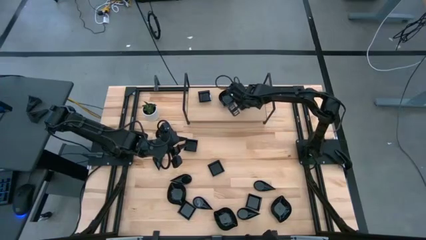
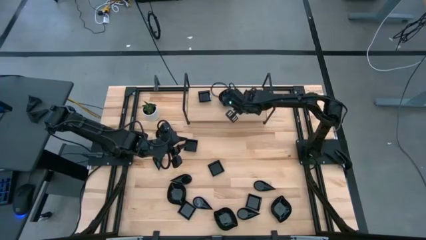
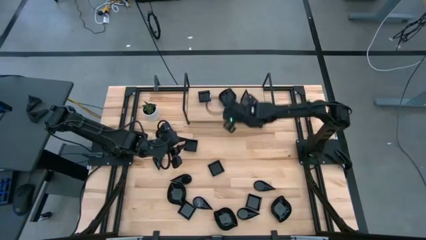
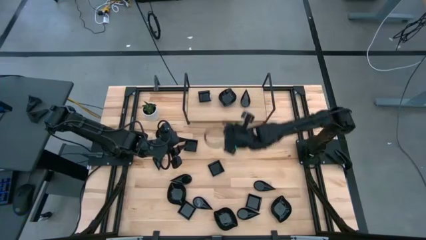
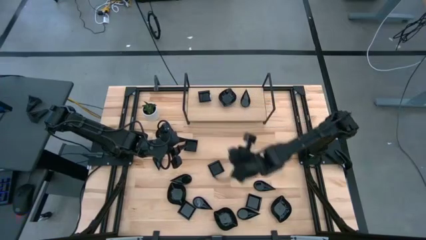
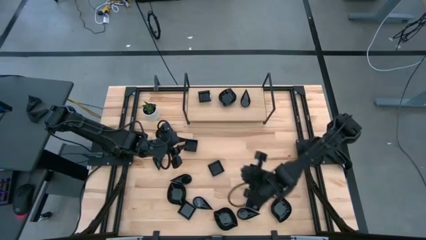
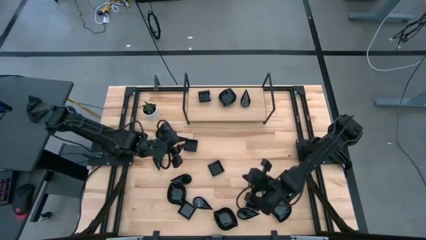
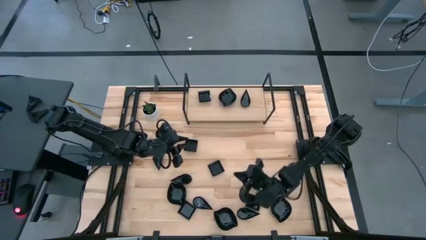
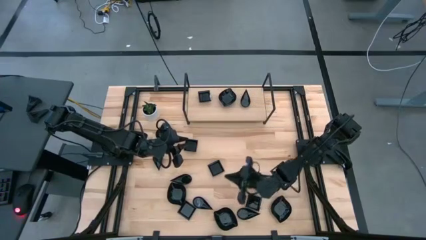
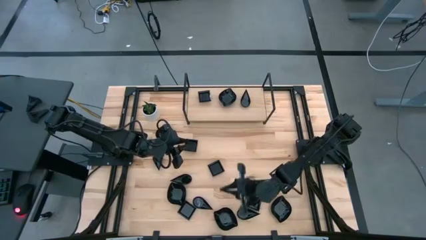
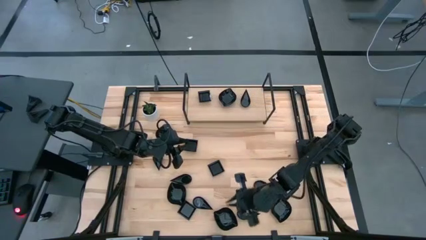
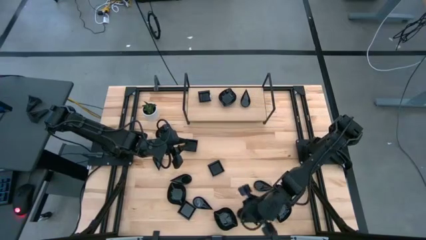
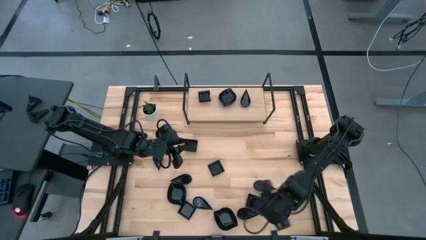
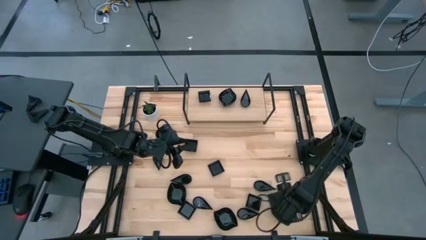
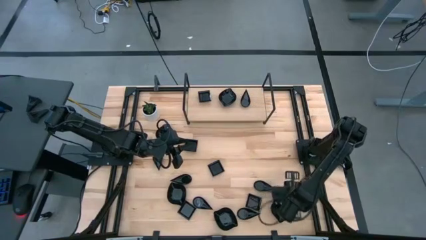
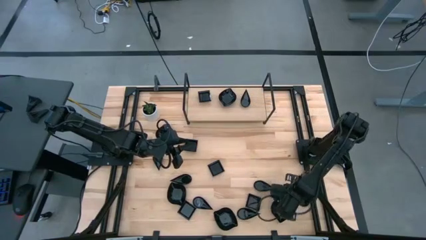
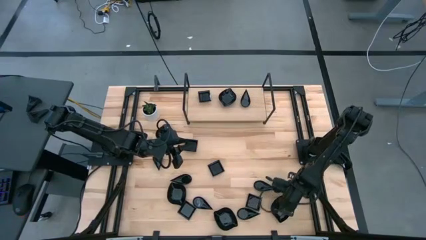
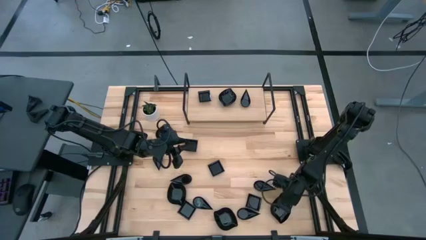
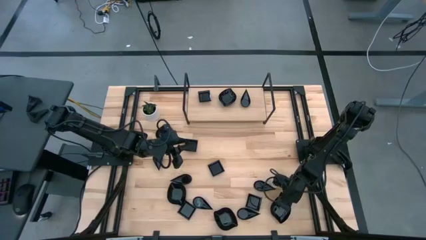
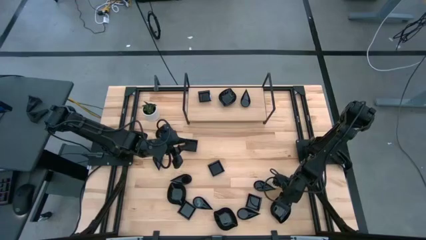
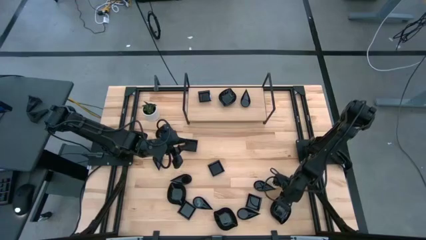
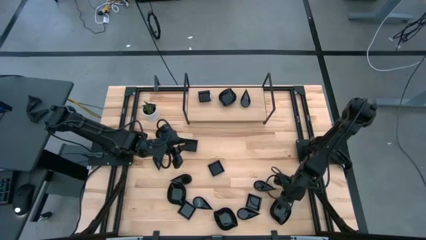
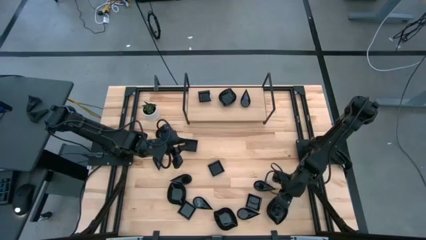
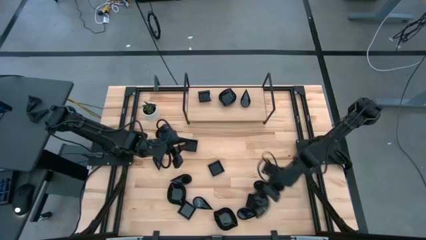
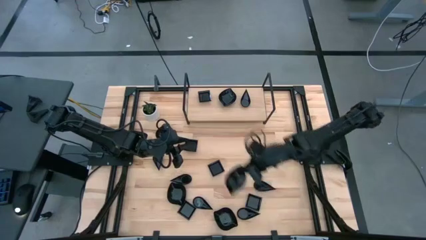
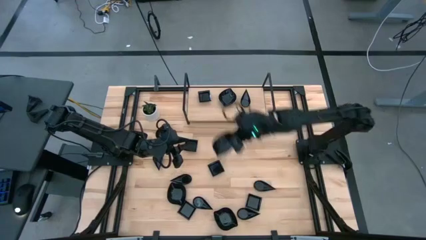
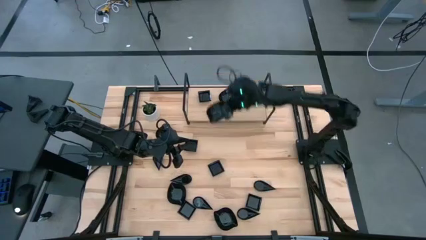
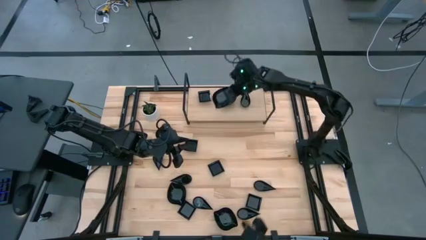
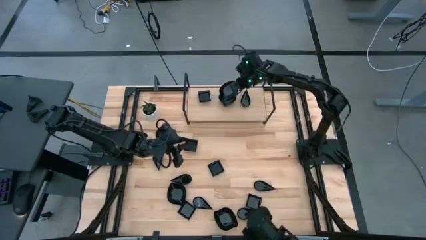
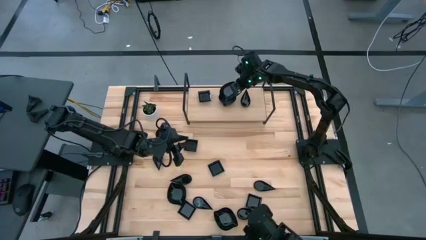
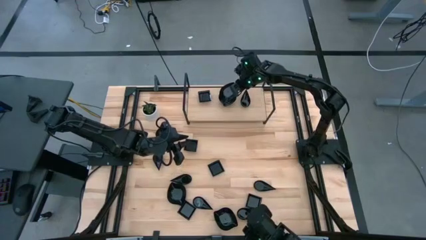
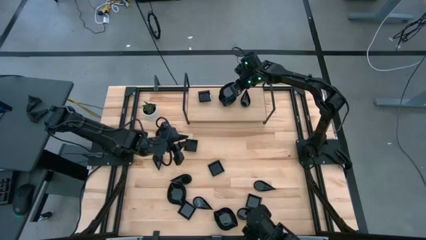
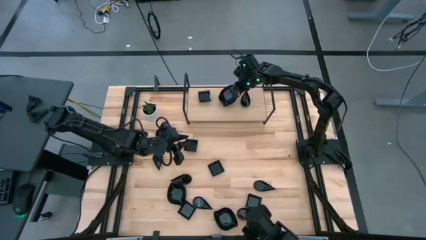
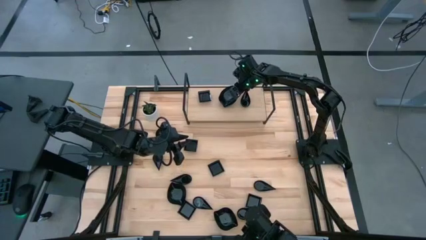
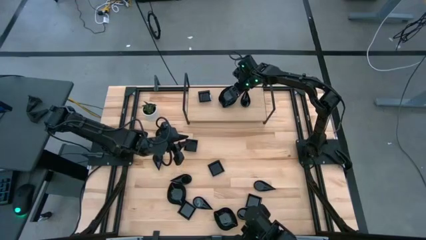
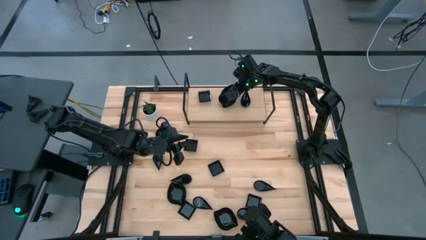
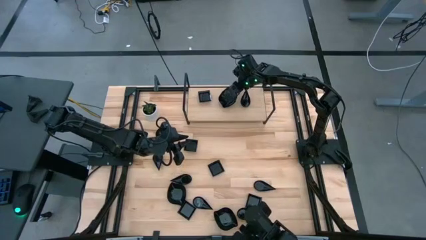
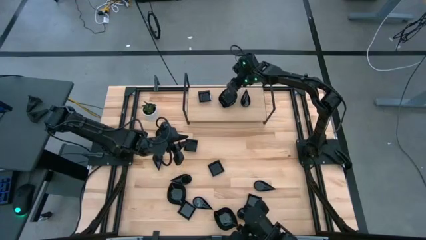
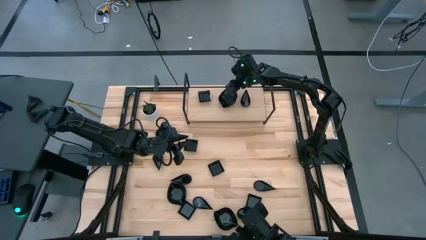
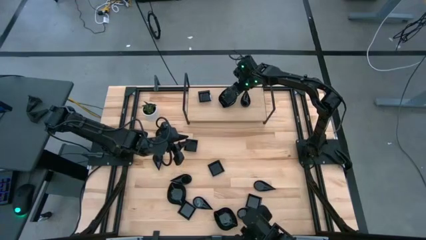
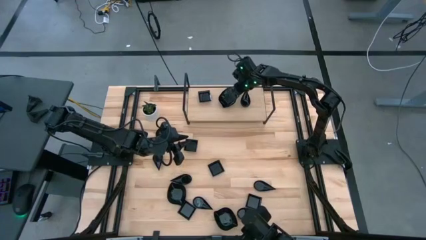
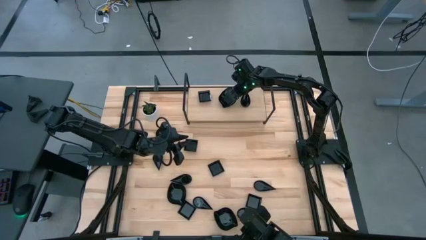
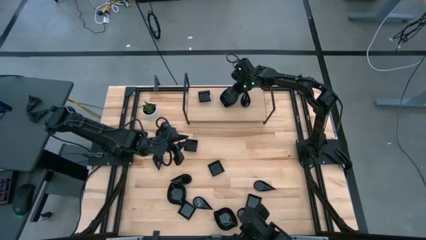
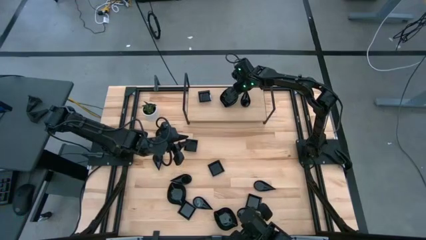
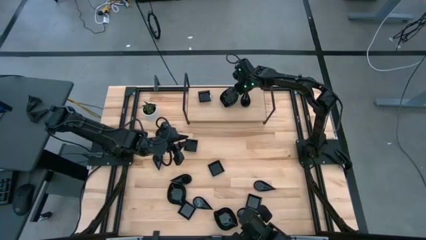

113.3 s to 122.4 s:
Task: Pick & Place Mini shaped plates
Stack the black leaf shaped bowl on top of the other black leaf shaped bowl on the shelf

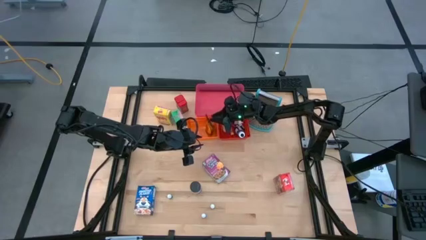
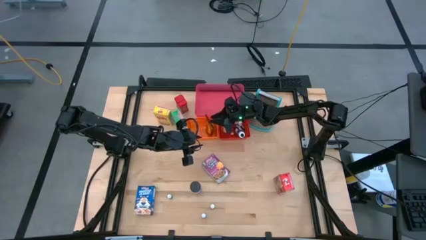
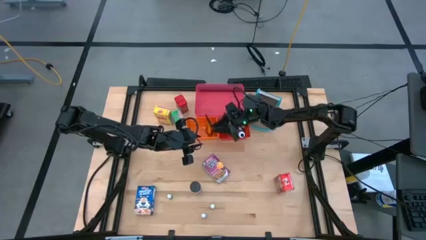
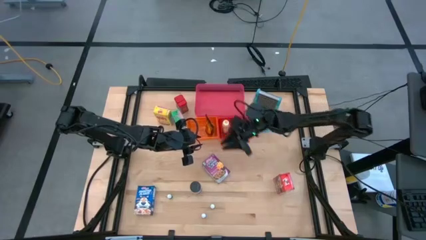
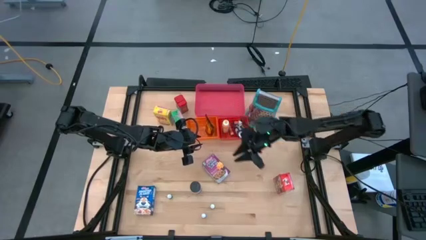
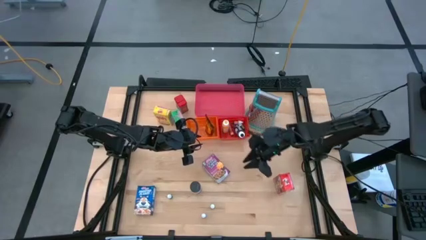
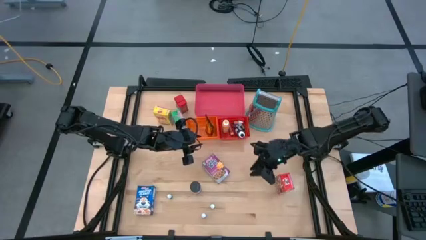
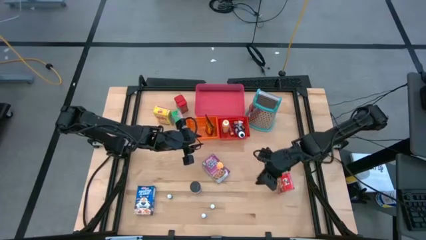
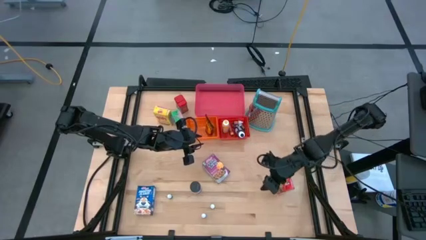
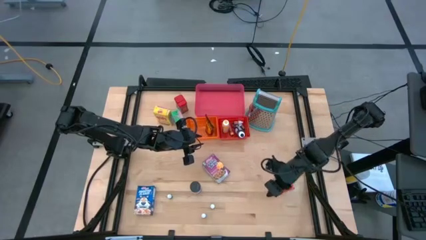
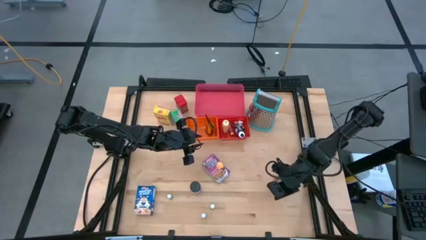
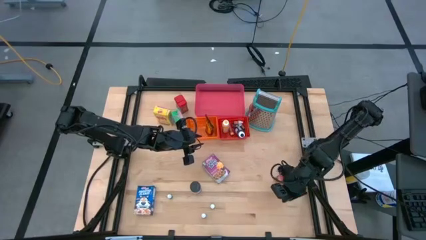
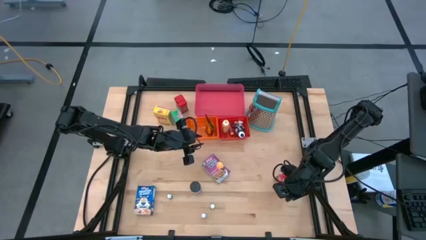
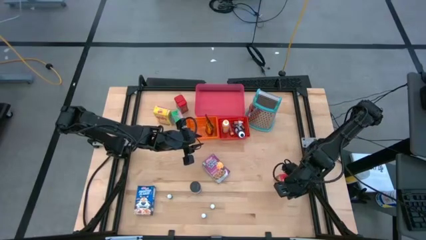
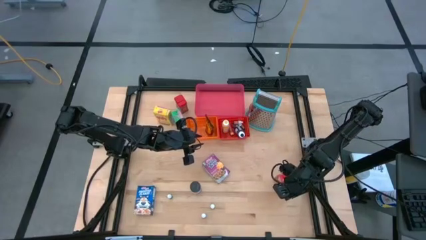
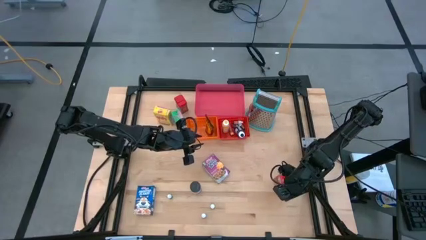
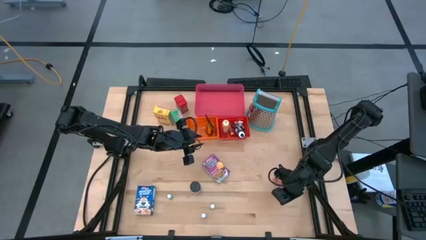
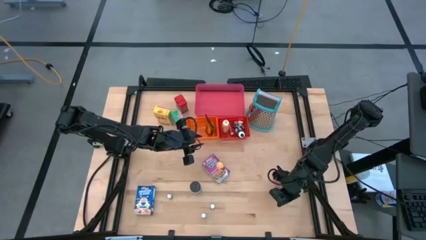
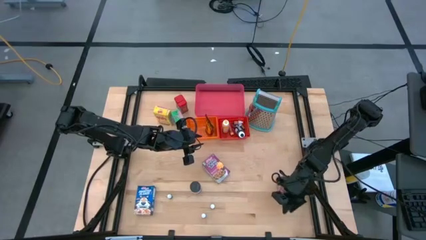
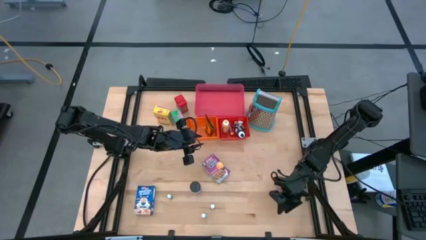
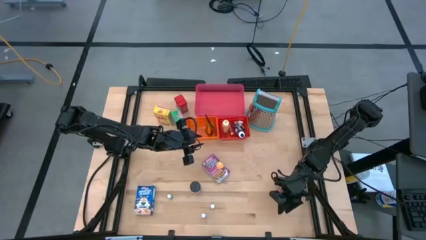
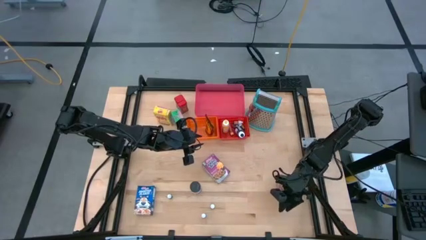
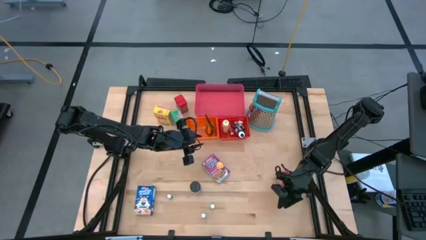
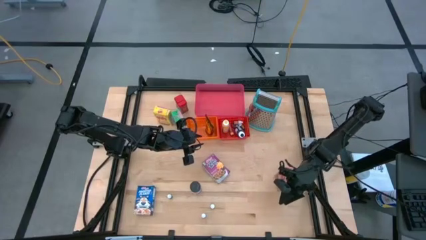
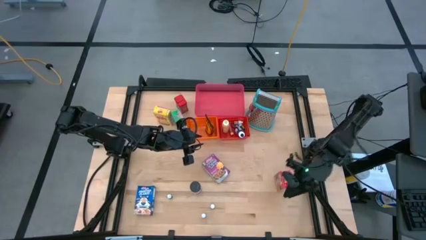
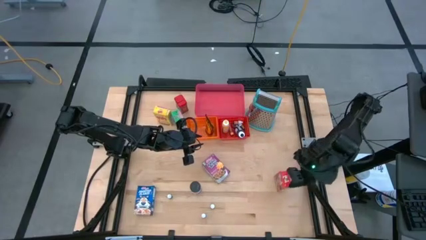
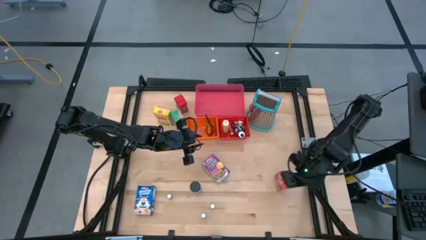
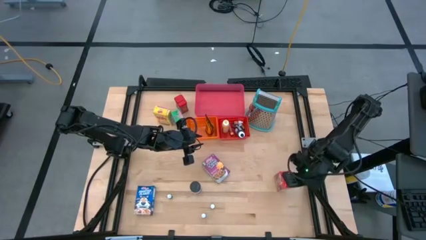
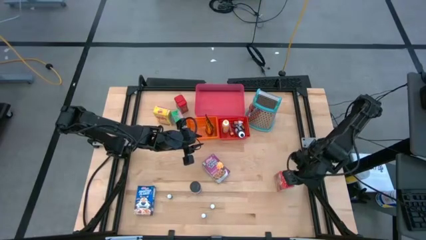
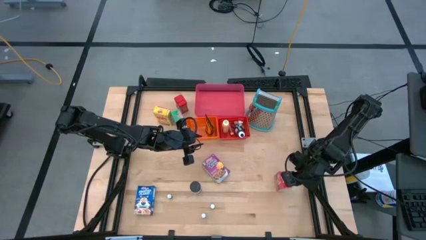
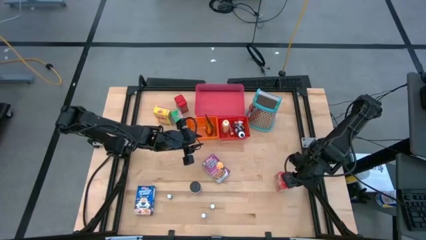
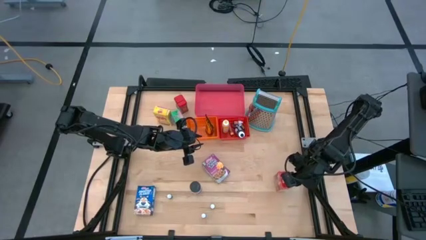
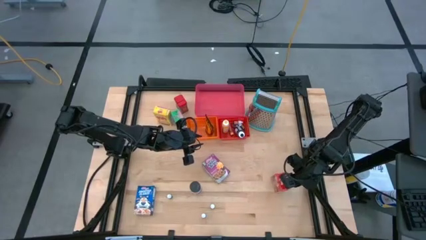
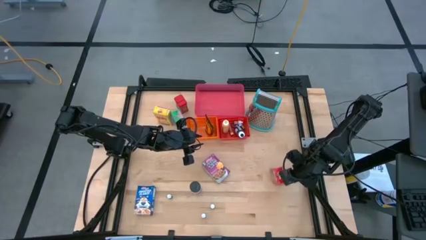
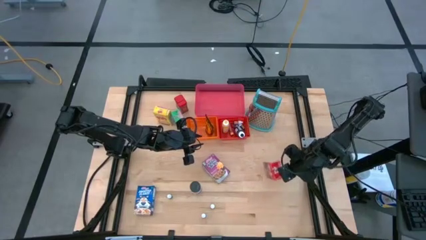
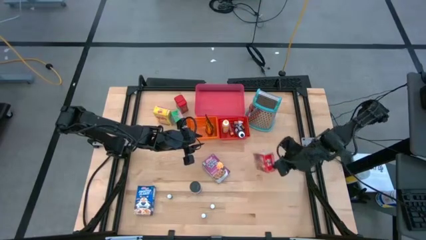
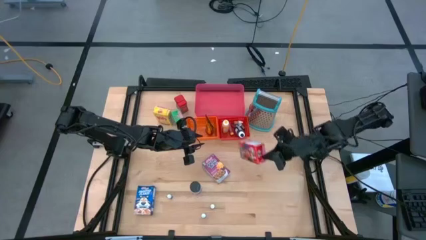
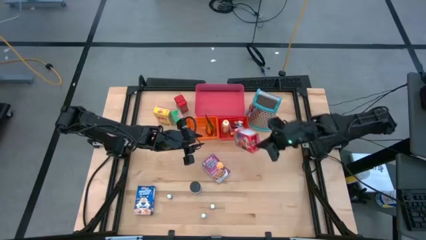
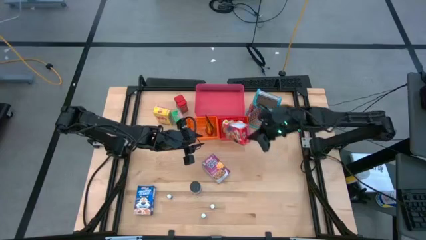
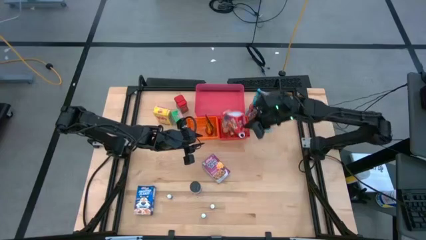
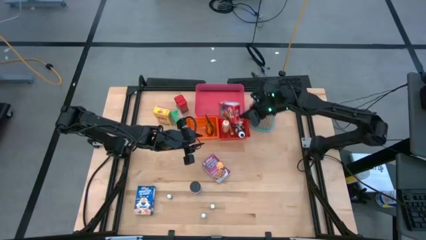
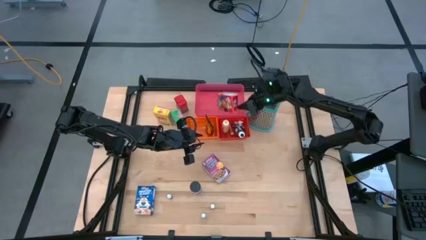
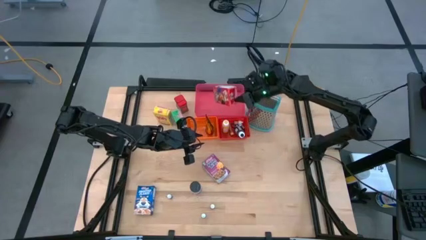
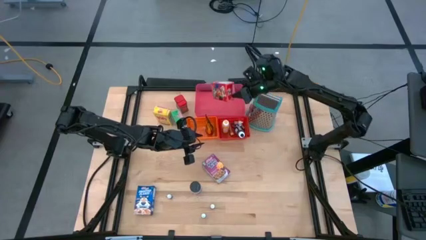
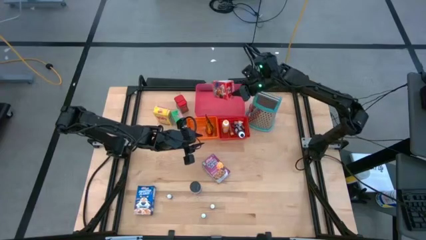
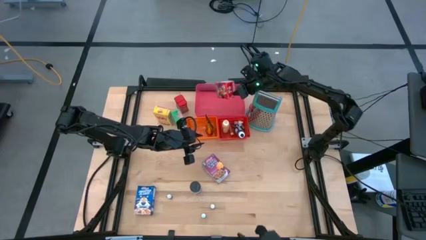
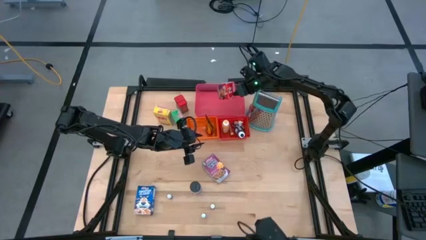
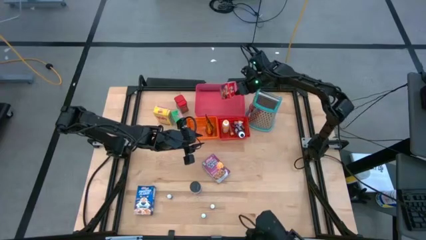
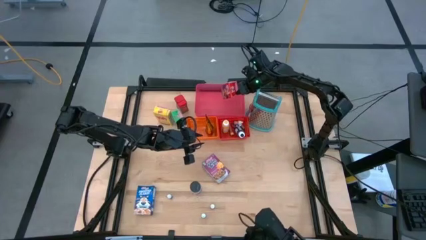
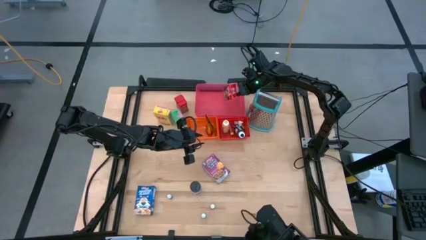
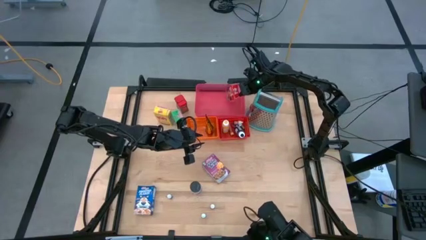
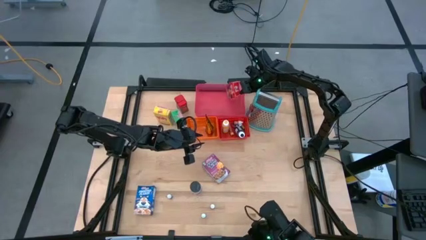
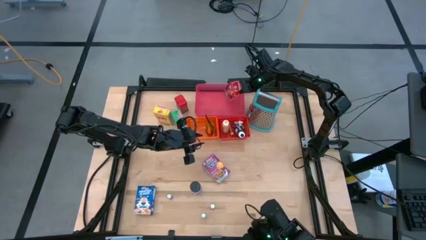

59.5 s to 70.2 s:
Task: Pick & Place Kitchen Items
Put the red cereal box into the pink bin
